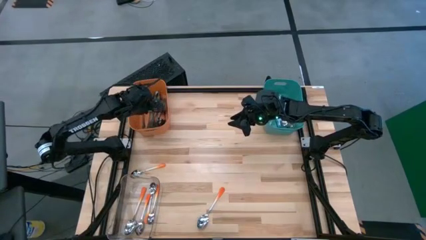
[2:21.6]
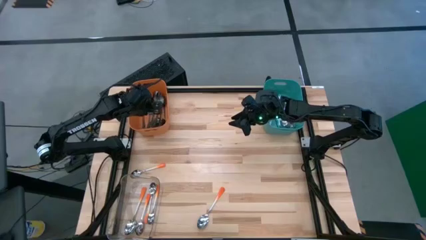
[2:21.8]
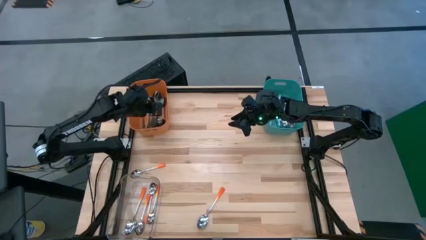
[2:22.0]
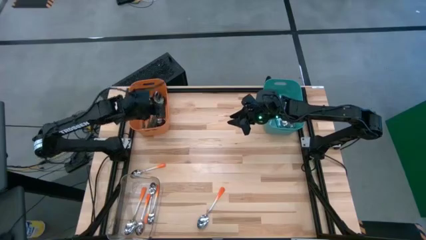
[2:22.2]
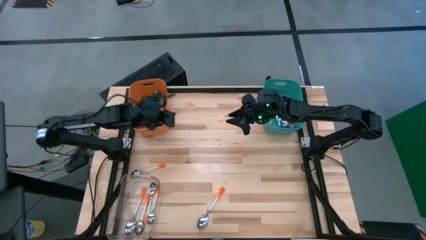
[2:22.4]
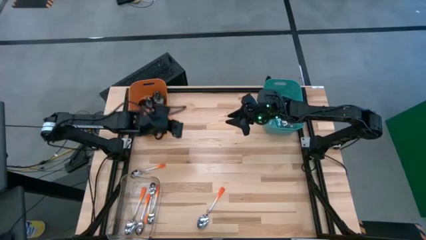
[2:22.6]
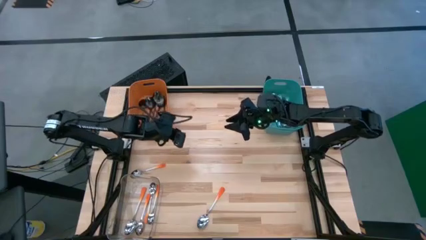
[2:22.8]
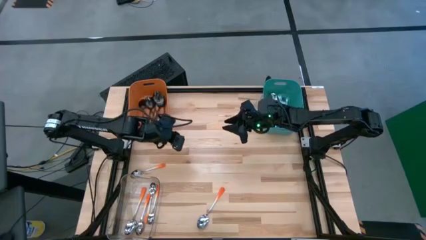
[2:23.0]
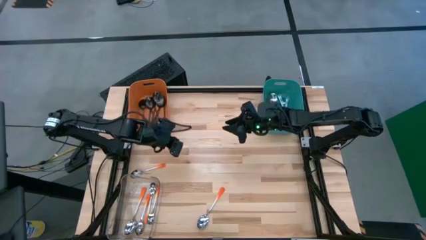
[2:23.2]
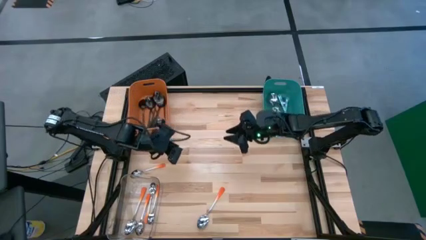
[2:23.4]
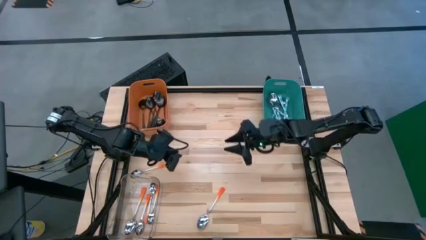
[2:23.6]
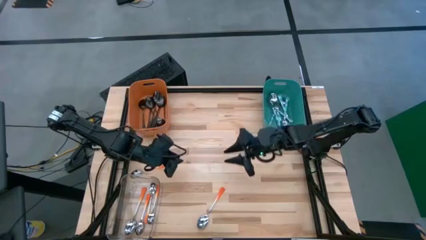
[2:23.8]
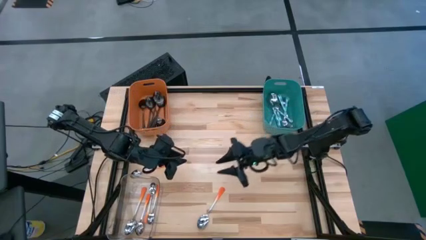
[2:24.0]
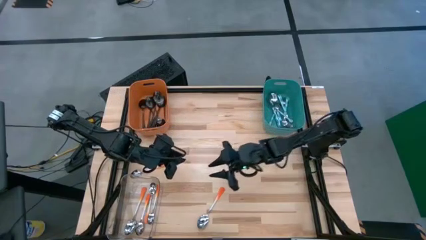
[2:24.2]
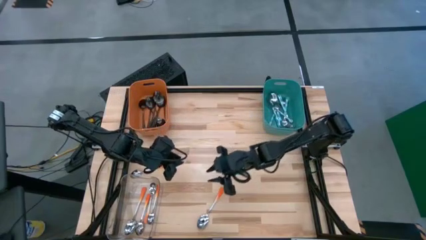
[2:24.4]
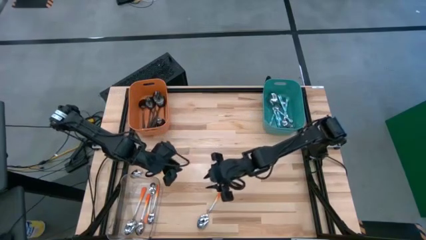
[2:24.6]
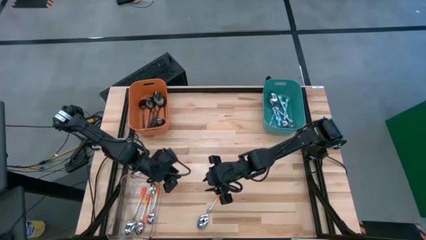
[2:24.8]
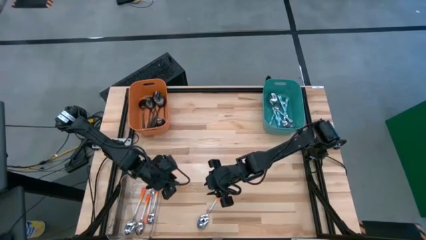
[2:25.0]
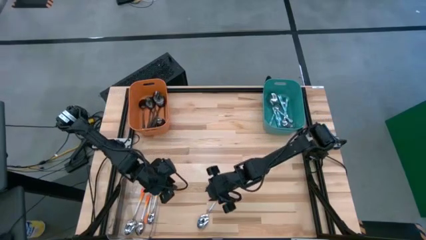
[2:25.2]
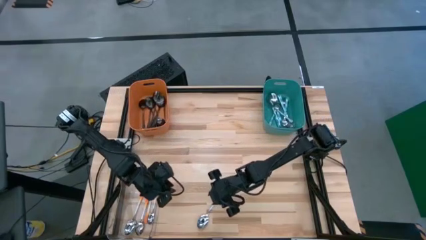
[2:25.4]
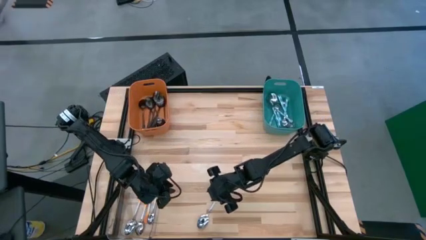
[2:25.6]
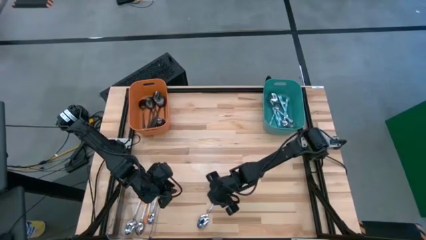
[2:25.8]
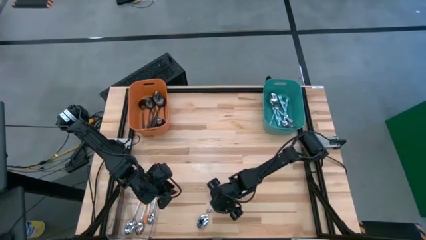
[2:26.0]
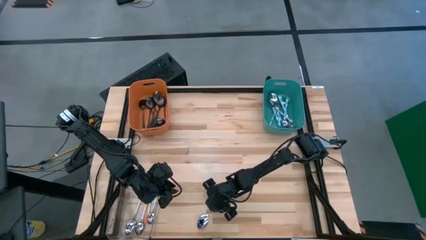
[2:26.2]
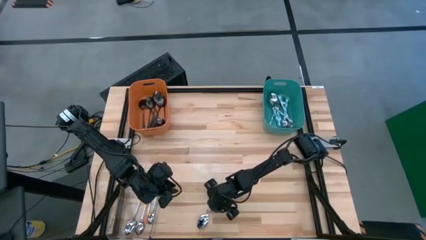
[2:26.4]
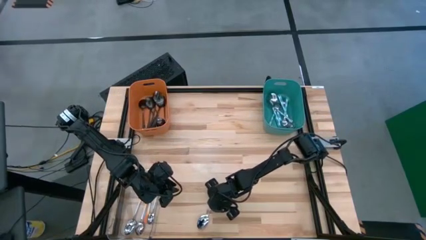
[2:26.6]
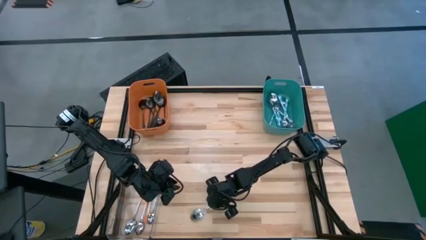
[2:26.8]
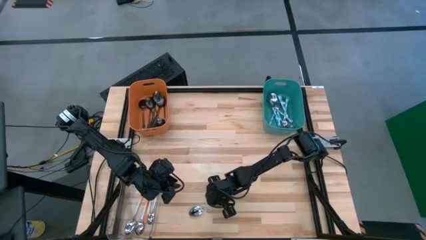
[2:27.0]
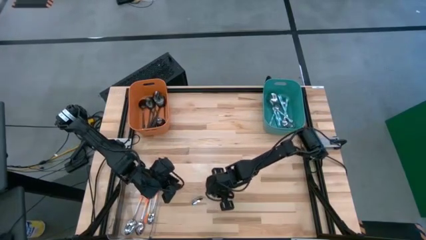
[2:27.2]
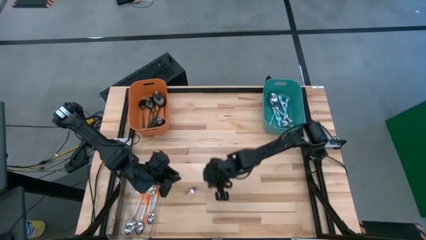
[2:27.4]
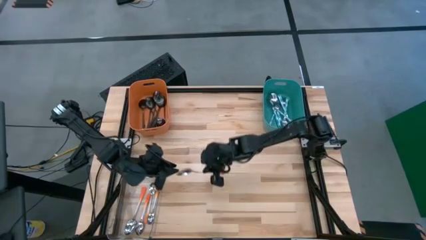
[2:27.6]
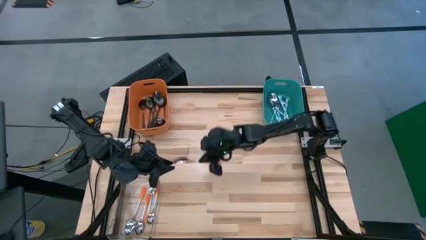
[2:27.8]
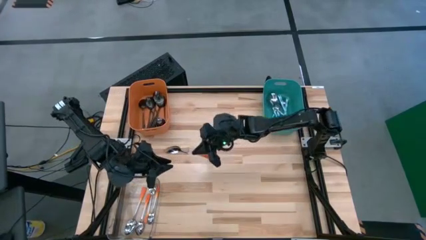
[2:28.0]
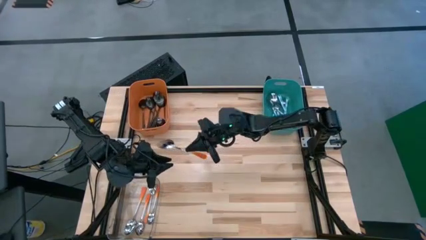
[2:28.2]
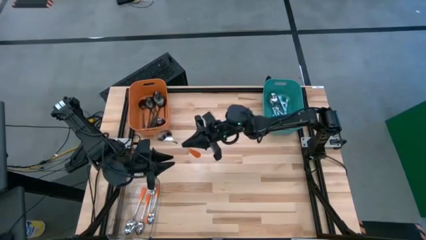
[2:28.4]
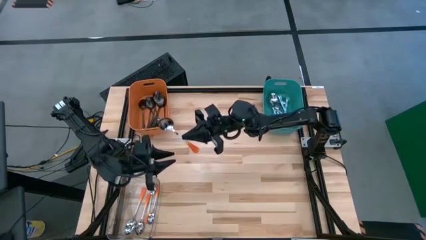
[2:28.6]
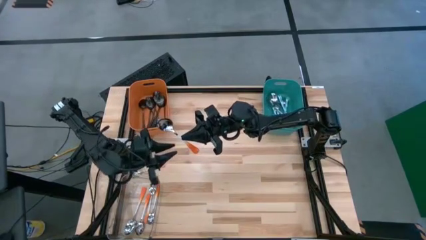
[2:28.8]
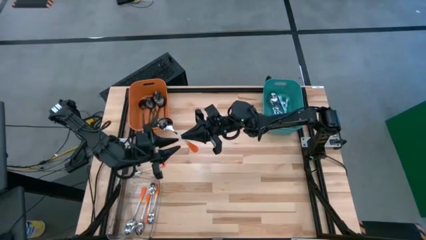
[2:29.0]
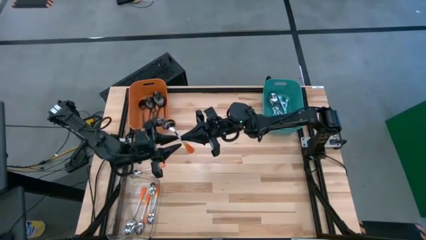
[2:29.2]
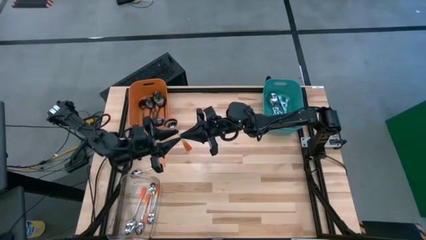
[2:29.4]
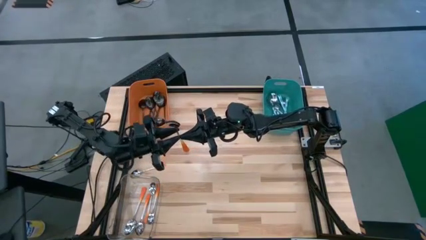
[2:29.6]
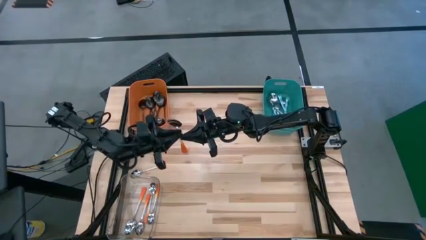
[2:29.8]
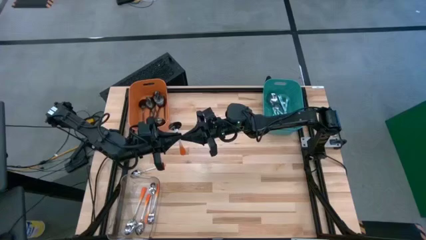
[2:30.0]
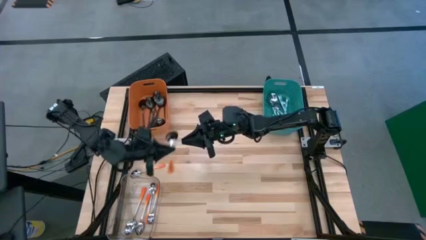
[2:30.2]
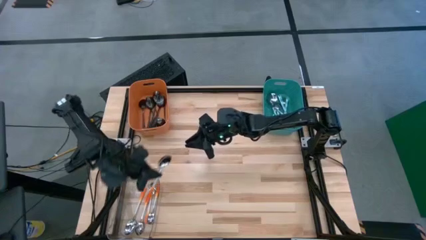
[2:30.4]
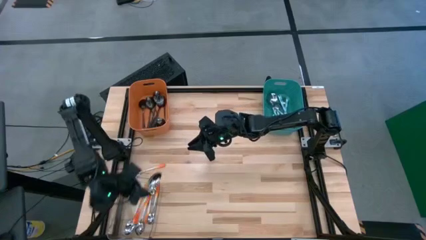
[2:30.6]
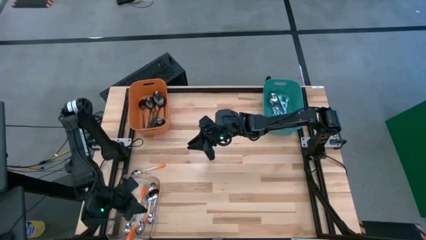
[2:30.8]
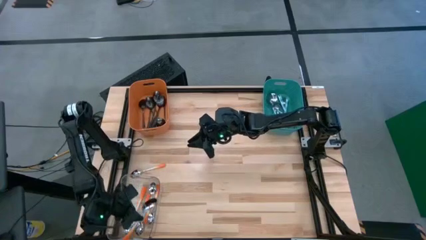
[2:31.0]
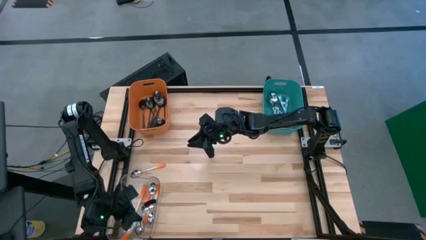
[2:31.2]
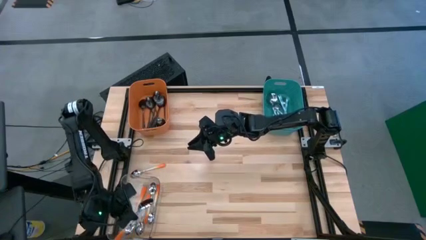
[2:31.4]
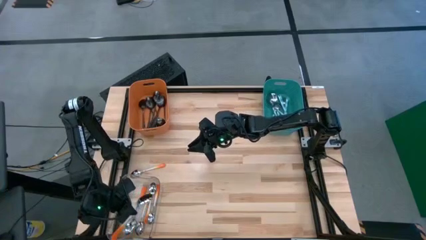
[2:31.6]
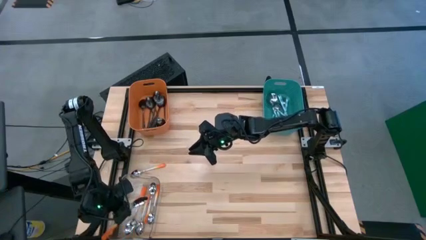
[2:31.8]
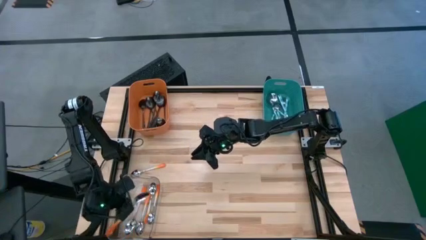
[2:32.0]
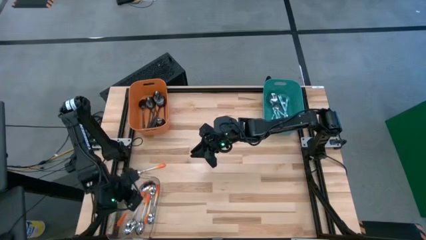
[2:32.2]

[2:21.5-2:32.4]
Task: Sort silverware by color (type)
Put the orange spoon into the transparent bin

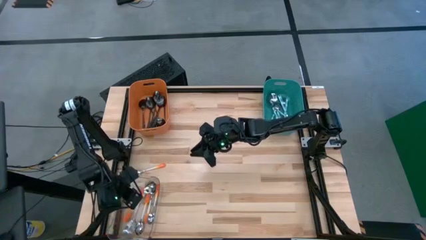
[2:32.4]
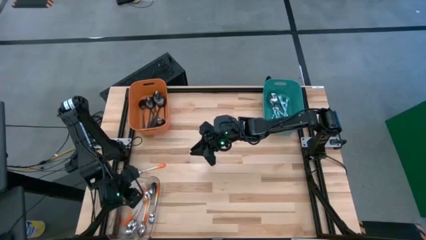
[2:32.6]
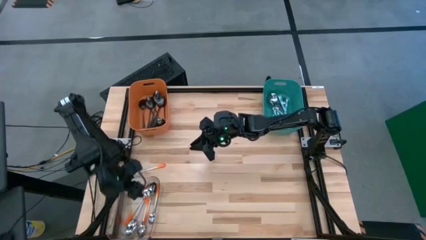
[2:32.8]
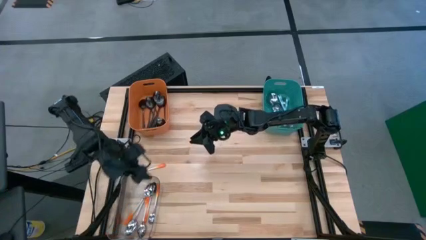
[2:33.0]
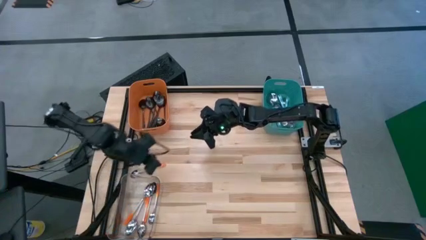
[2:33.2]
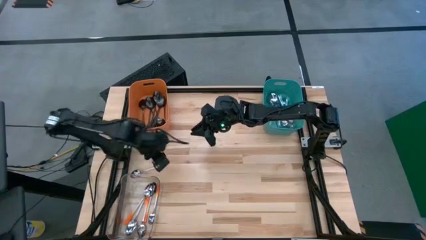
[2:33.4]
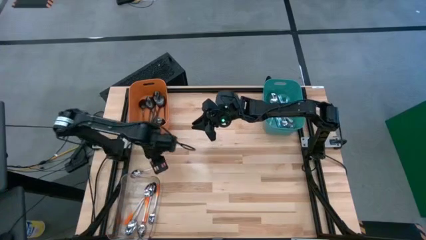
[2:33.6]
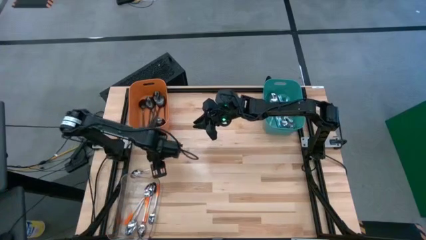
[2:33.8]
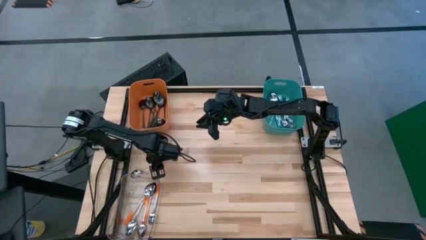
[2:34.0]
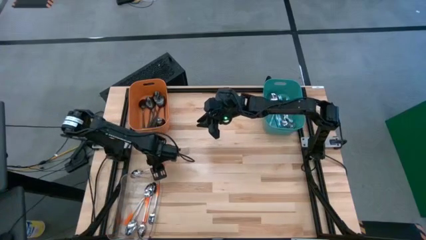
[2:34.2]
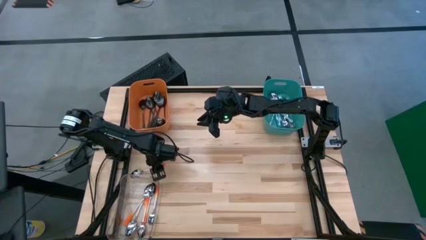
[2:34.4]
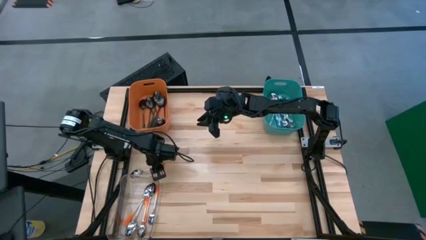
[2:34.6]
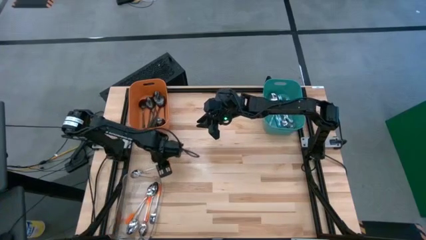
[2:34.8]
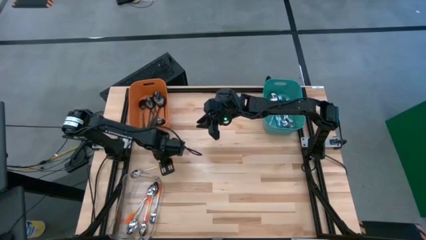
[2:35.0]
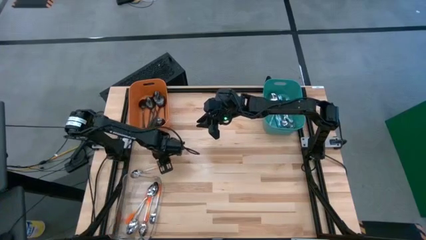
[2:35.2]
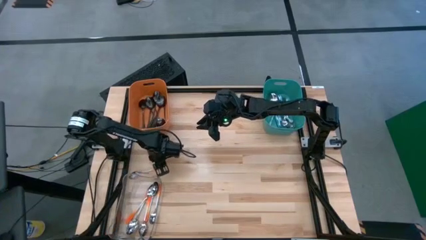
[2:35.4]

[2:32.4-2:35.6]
Put the orange spoon into the transparent bin

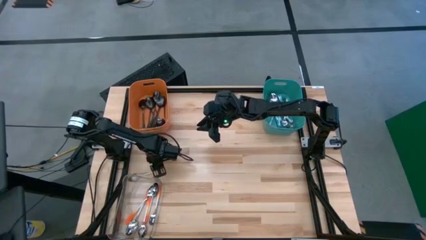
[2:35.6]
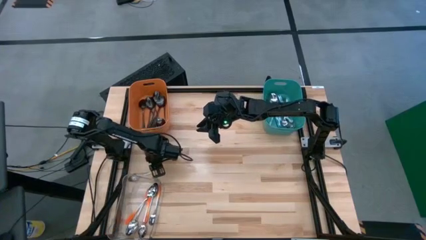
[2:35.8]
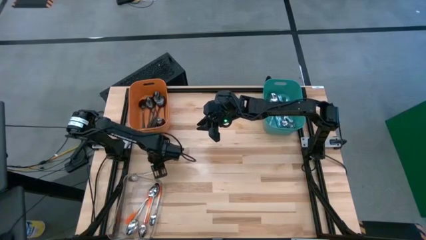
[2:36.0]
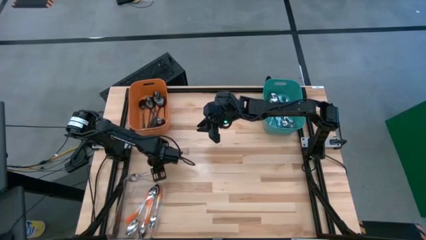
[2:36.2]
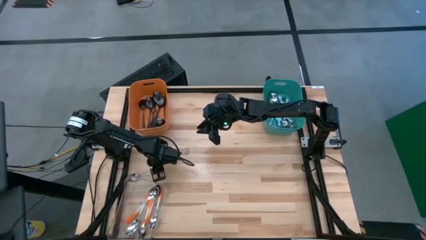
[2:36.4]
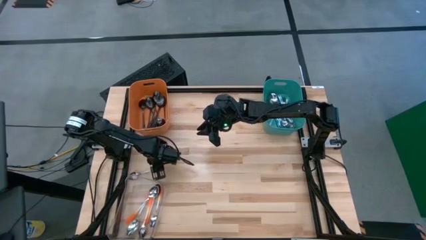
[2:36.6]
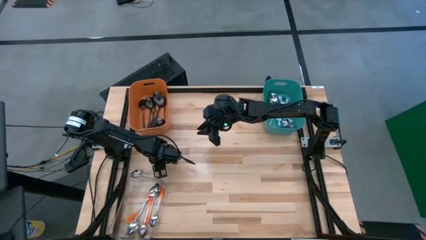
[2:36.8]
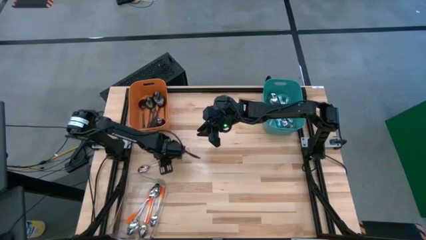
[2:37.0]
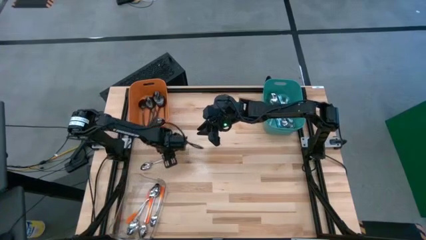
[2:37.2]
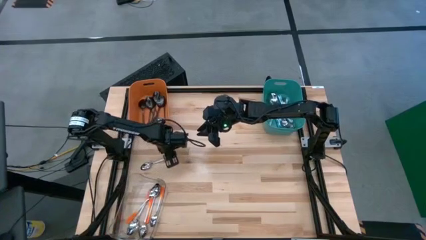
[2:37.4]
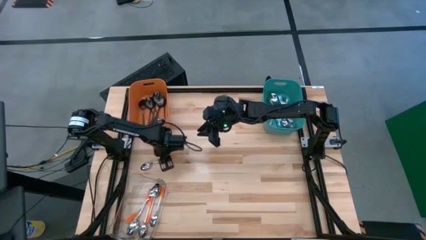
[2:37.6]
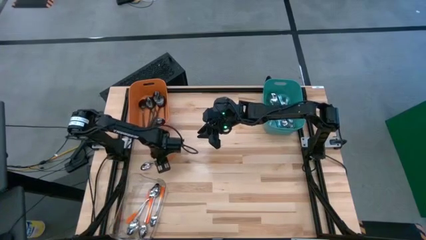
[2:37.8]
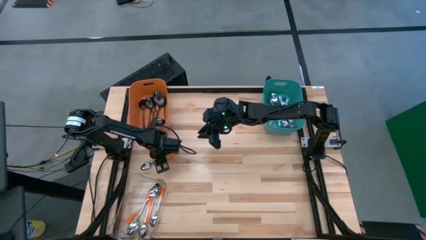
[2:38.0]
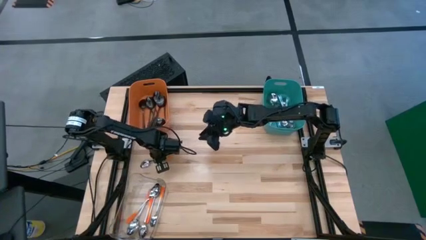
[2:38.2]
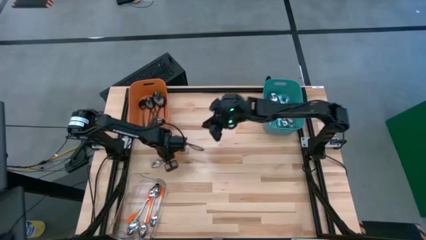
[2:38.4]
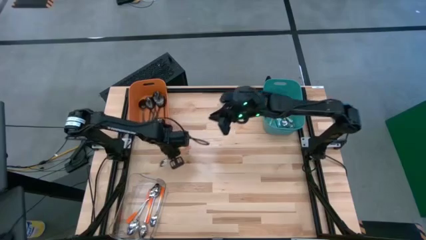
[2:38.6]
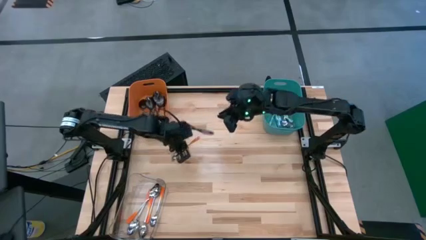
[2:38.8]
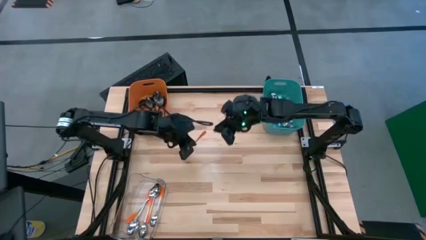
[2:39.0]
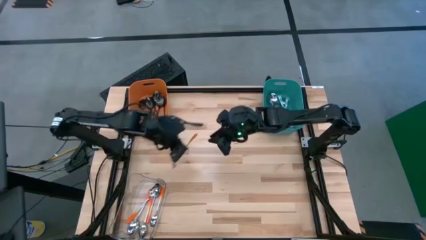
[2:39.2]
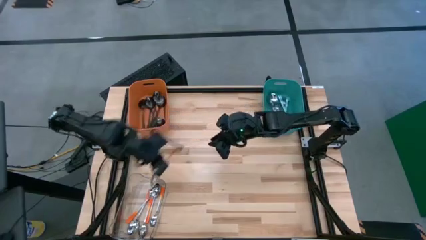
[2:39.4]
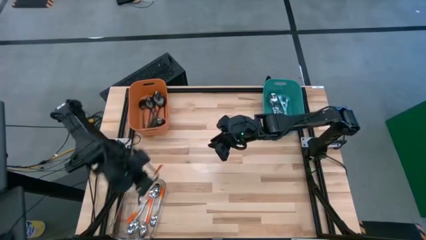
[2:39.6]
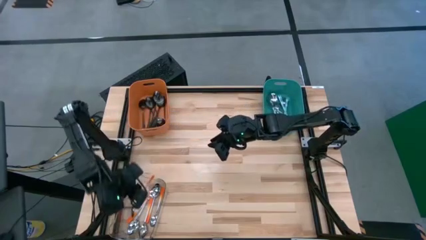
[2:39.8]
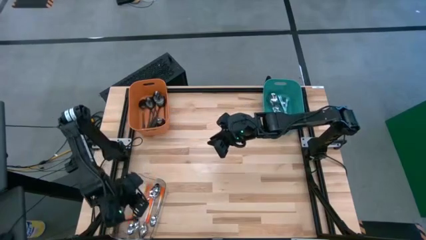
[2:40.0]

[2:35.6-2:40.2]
Put the orange spoon into the transparent bin
